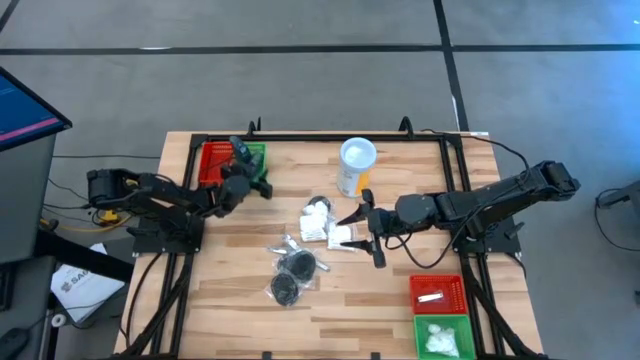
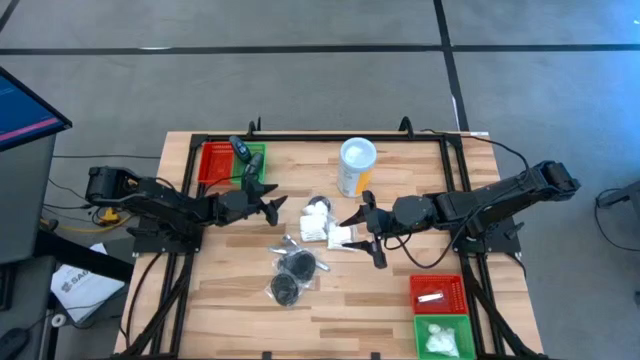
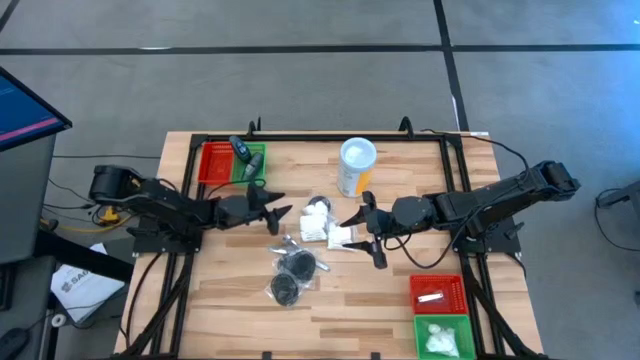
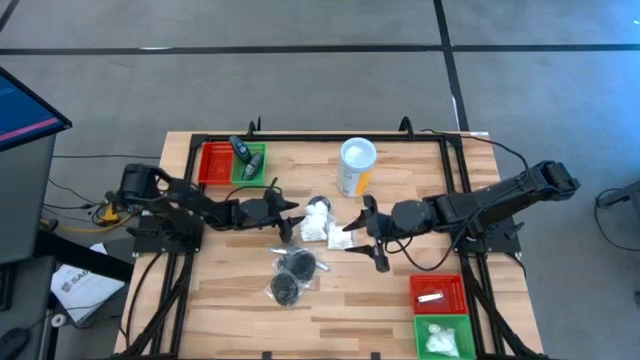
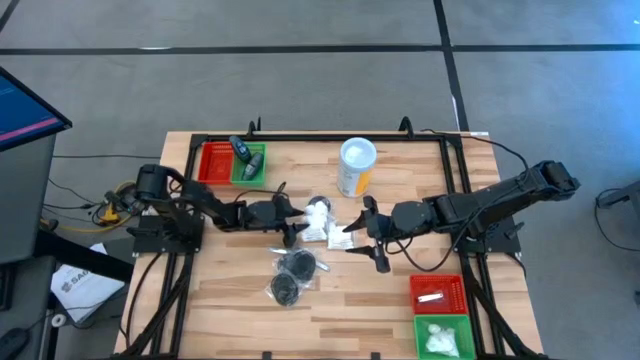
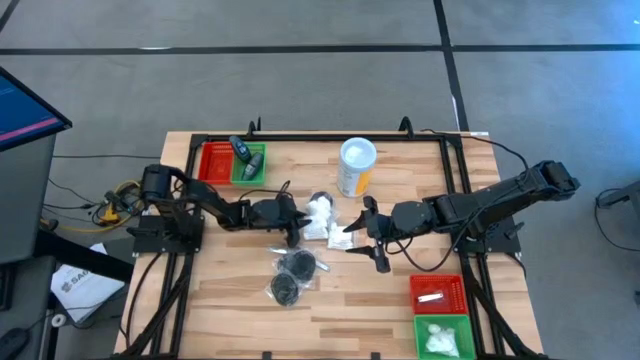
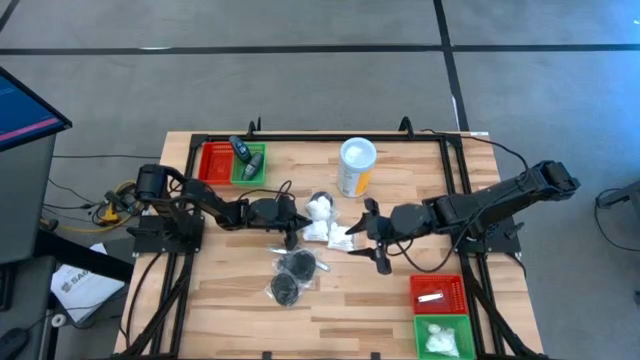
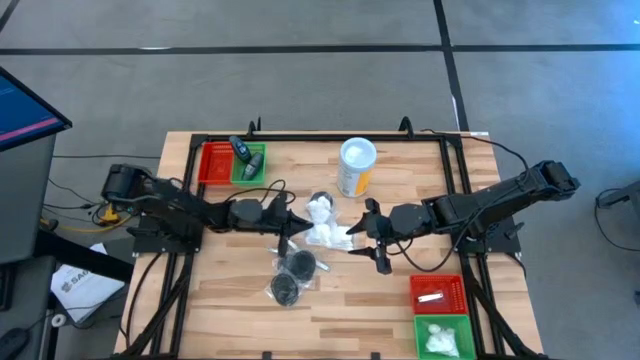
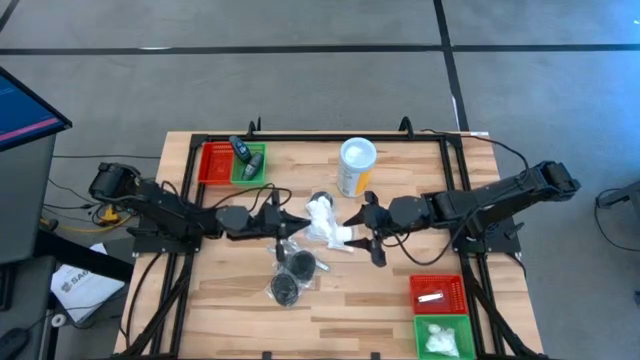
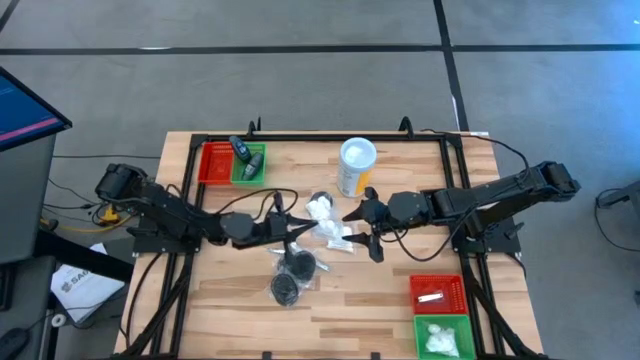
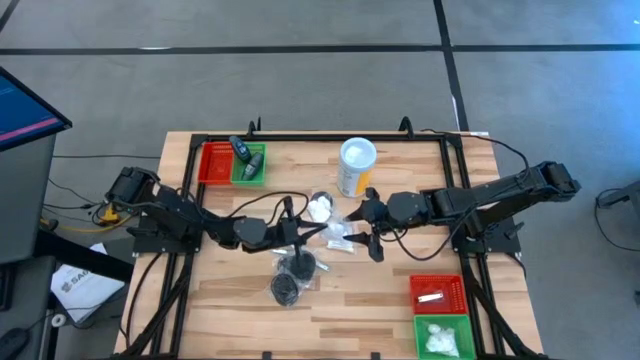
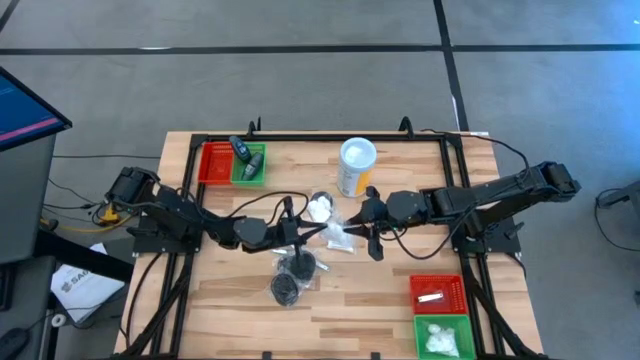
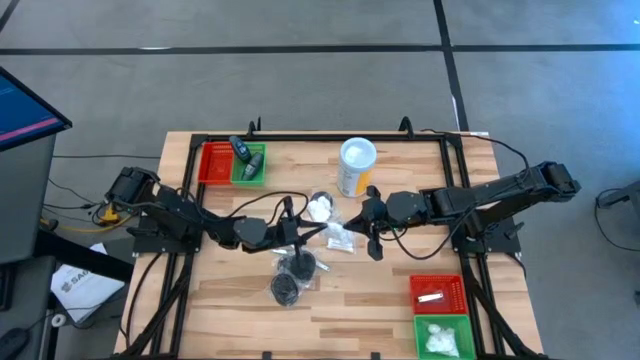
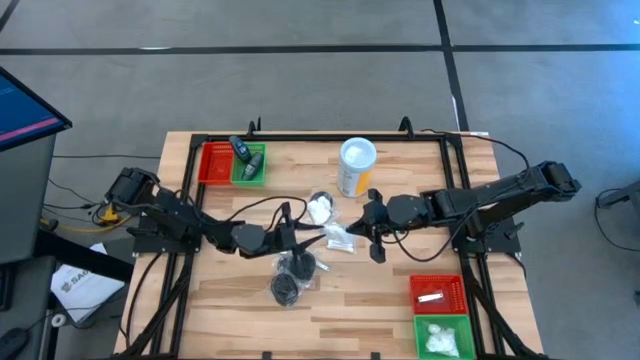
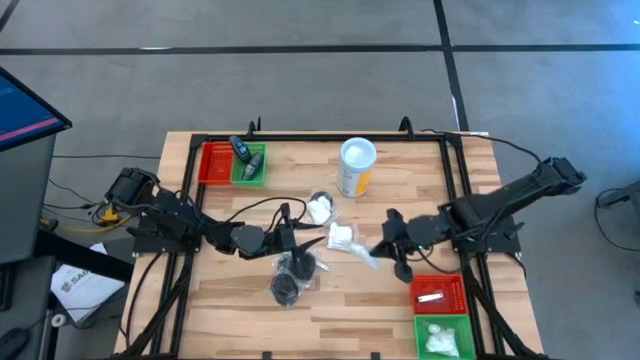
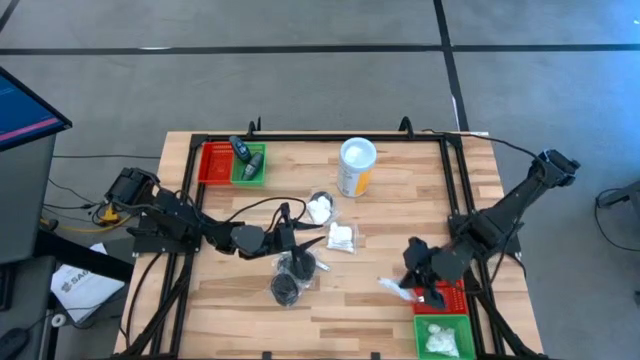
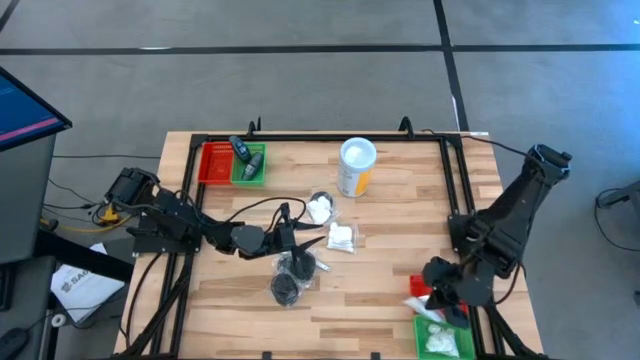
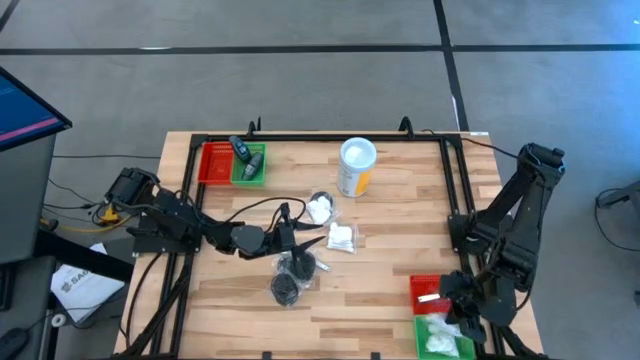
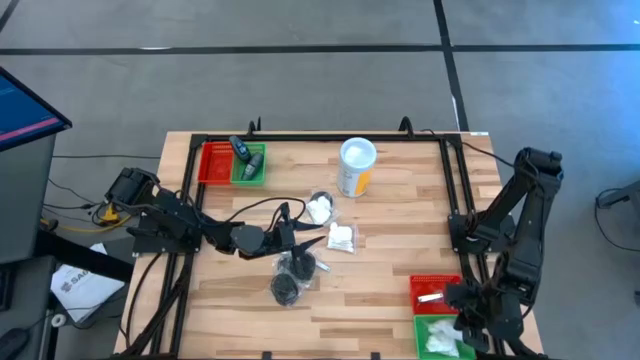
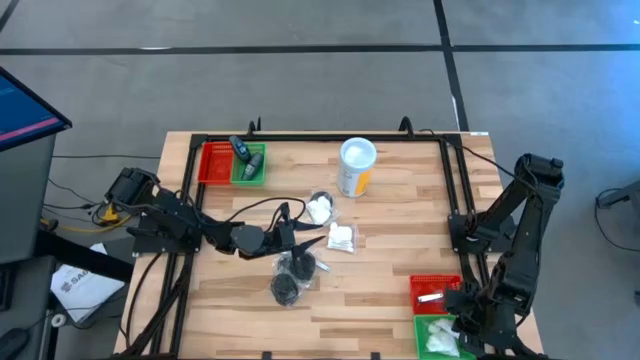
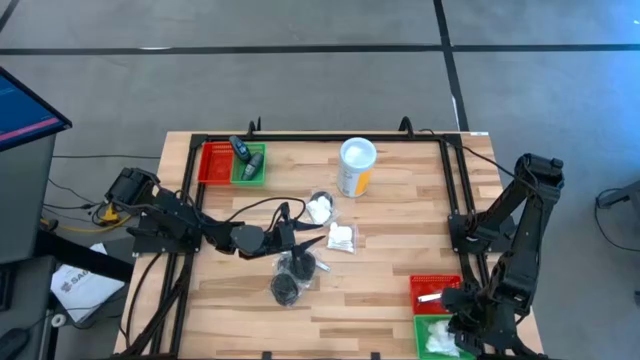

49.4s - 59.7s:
Task: Pick & Place Travel size toiletries
Put the white cotton pack into the bottom green bin

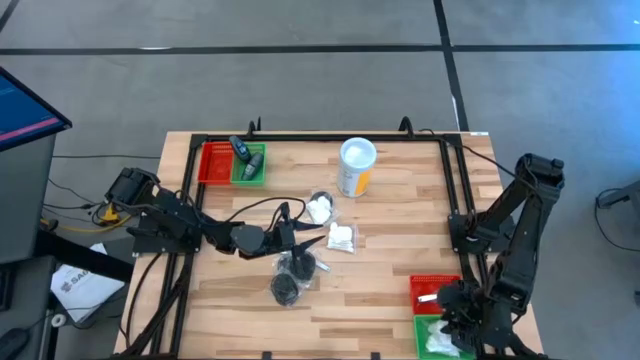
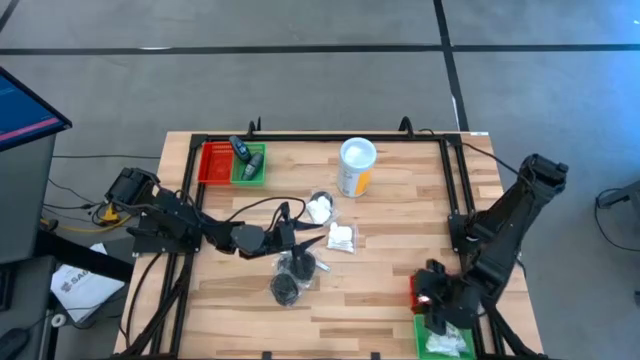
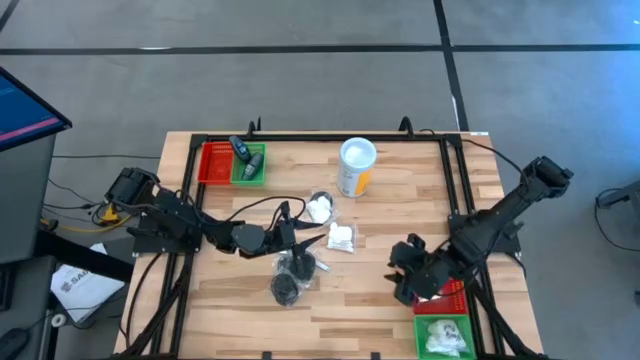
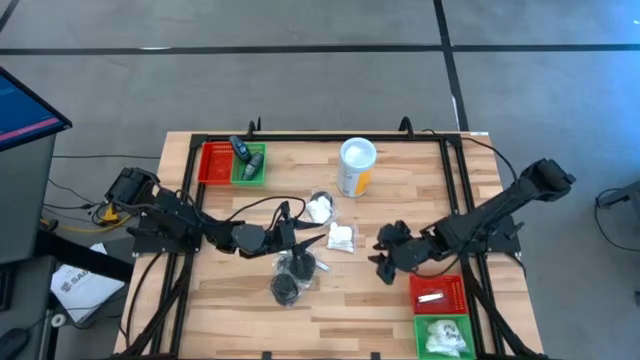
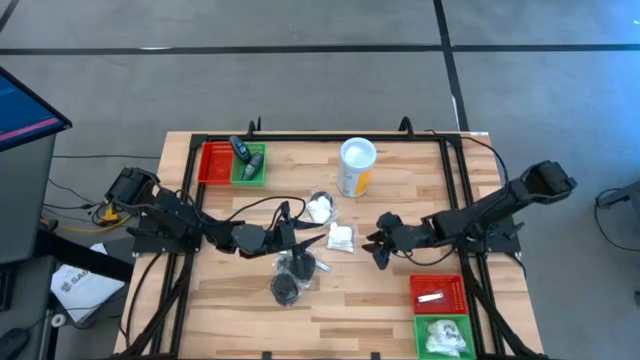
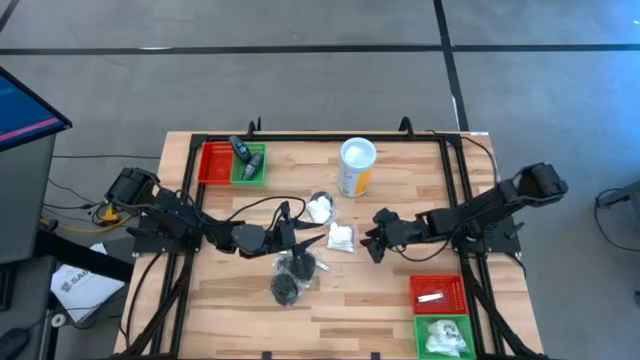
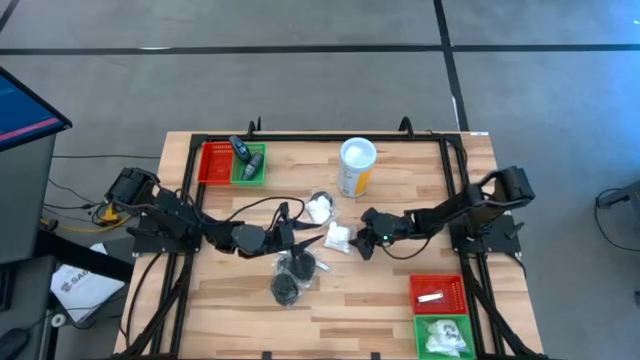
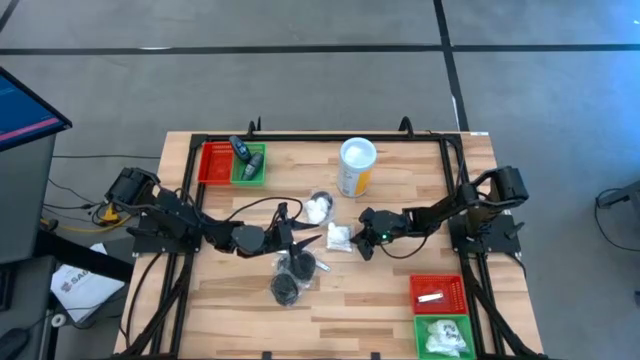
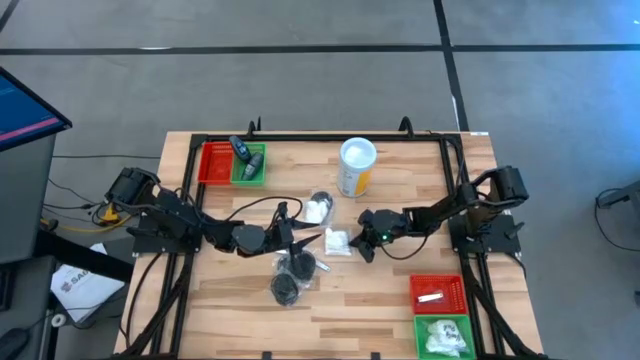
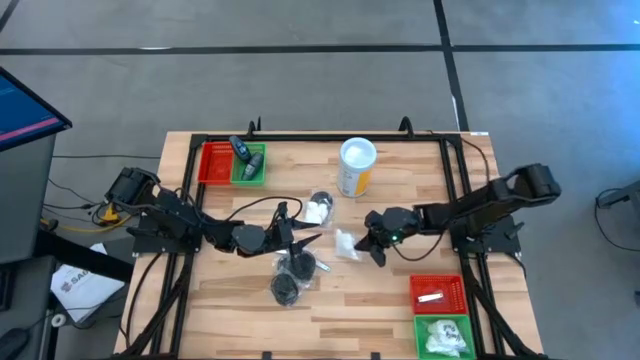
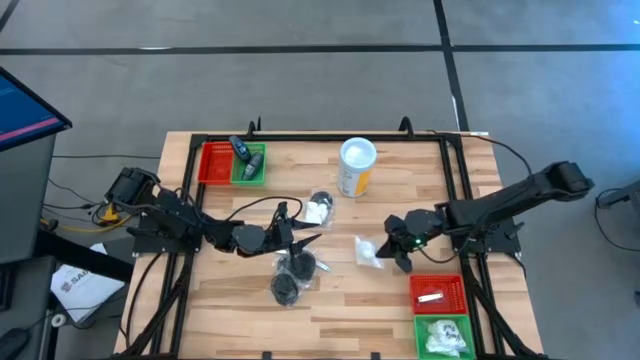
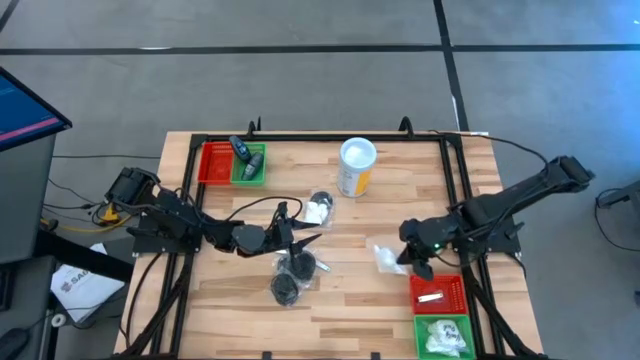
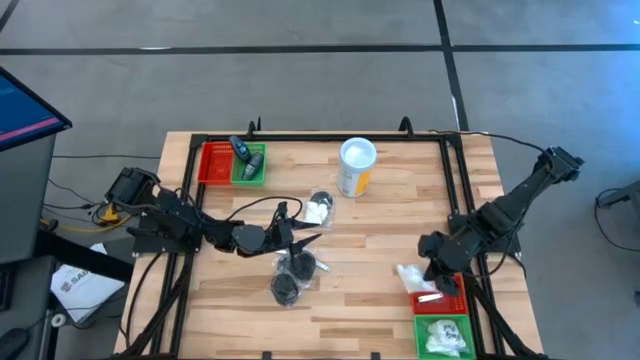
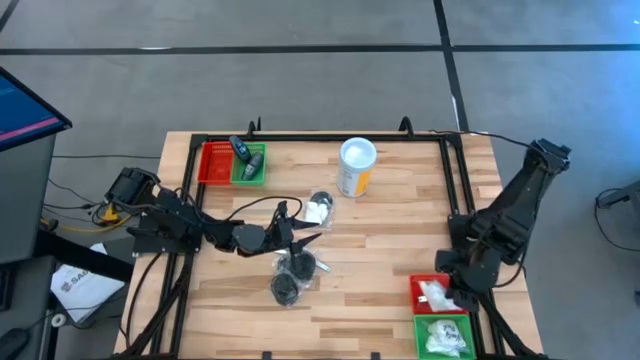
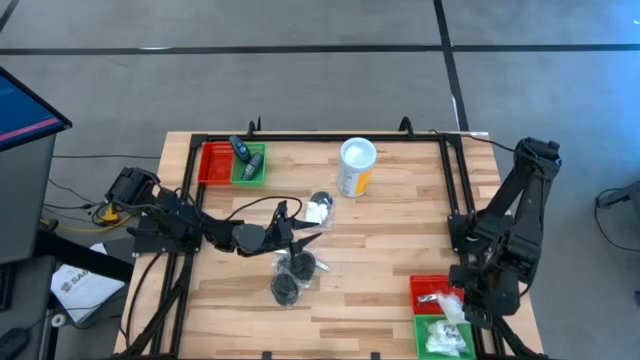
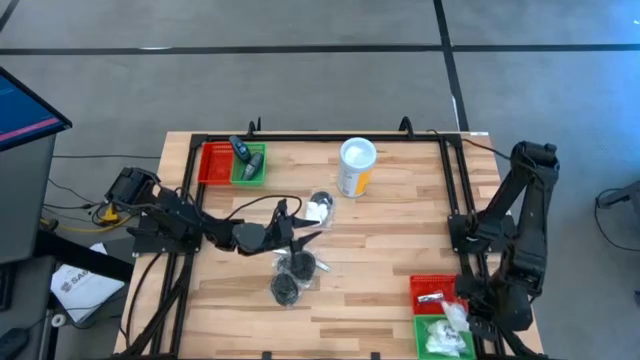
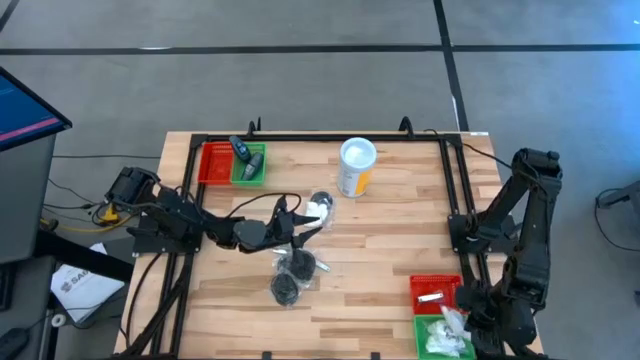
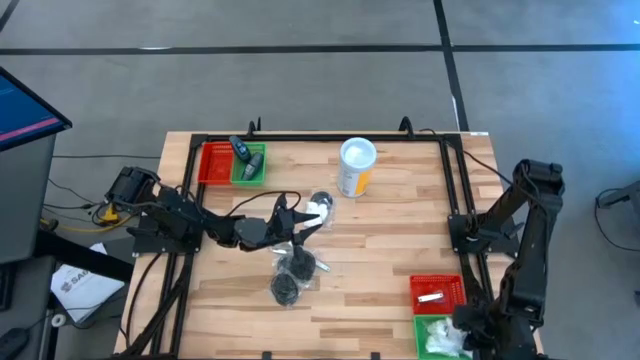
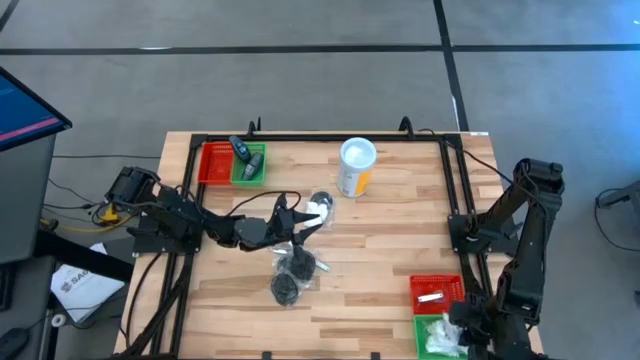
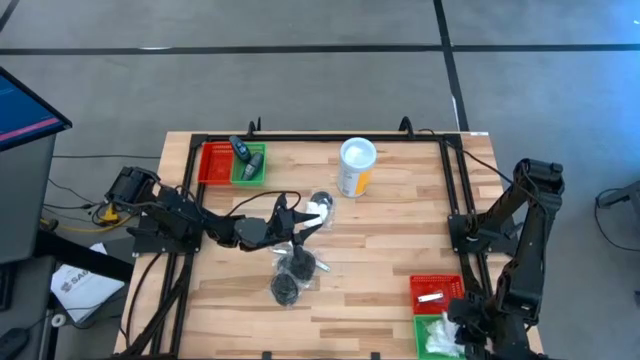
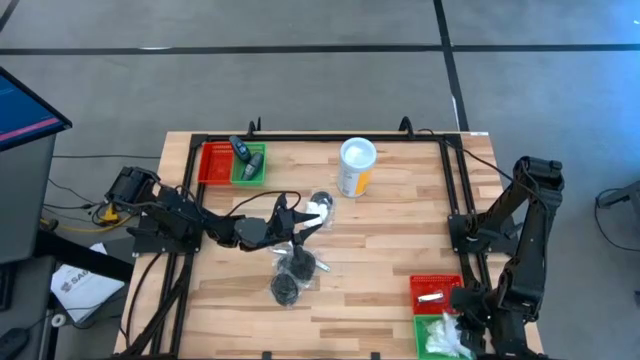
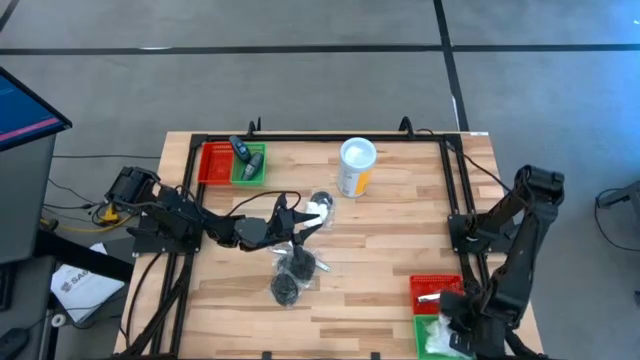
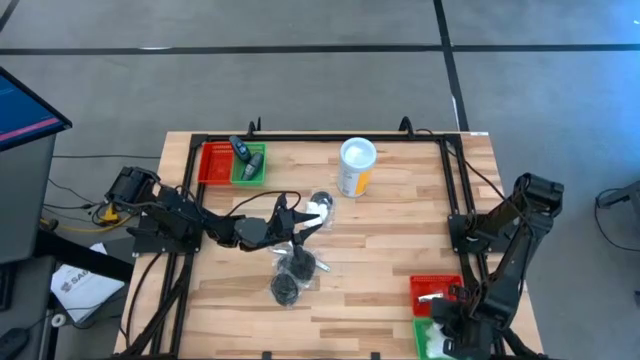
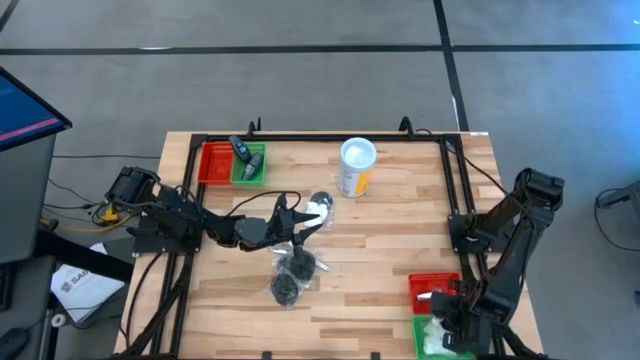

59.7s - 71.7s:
Put the white cotton pack into the bottom green bin
